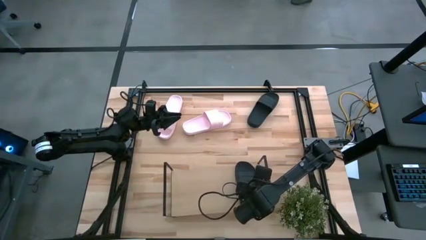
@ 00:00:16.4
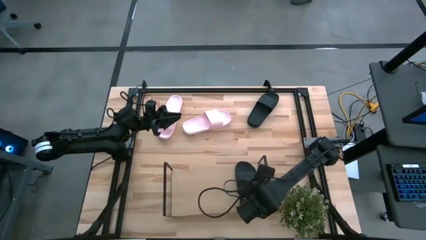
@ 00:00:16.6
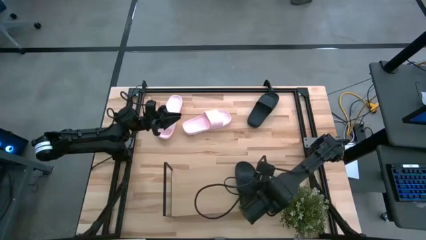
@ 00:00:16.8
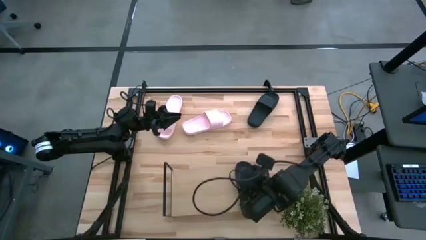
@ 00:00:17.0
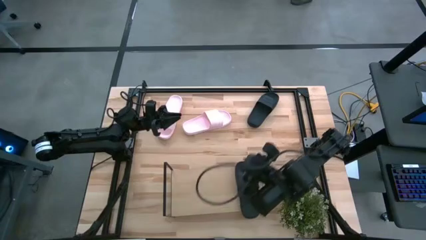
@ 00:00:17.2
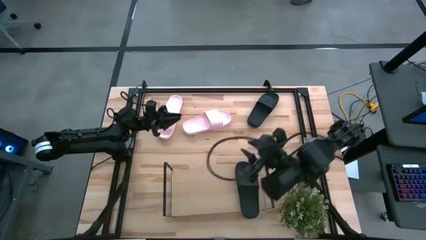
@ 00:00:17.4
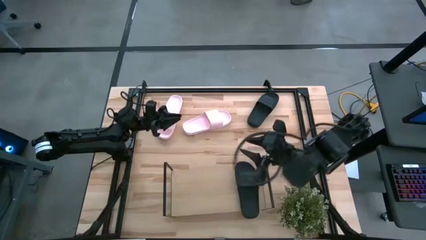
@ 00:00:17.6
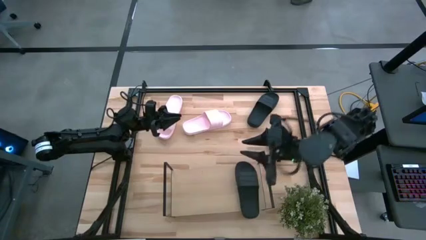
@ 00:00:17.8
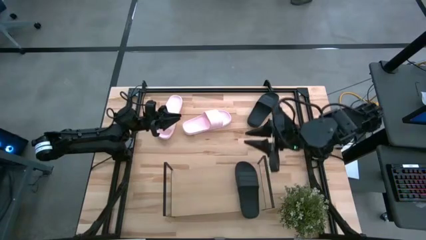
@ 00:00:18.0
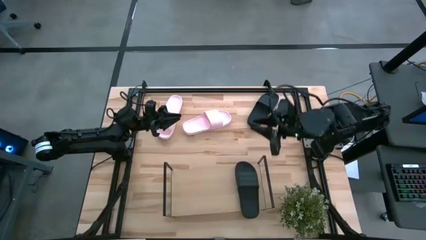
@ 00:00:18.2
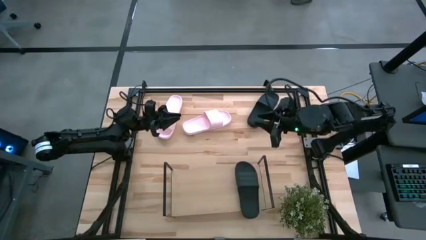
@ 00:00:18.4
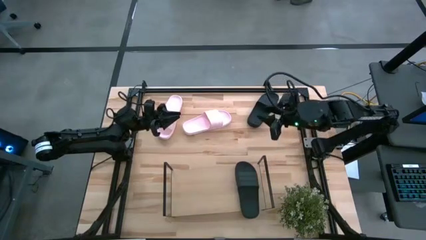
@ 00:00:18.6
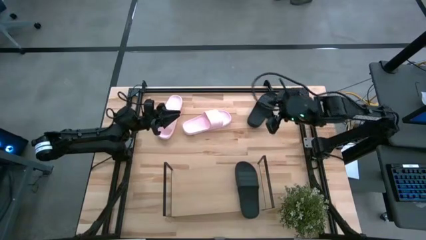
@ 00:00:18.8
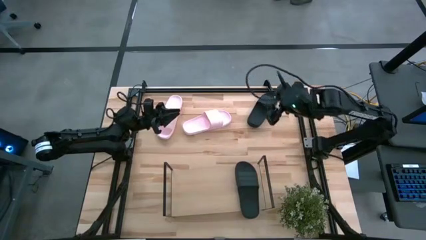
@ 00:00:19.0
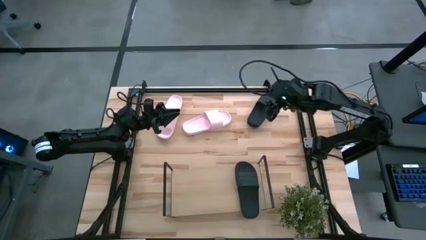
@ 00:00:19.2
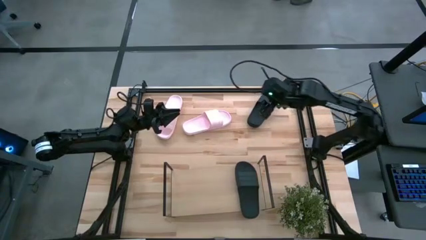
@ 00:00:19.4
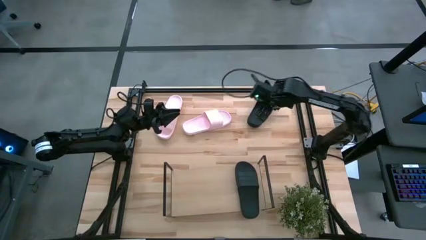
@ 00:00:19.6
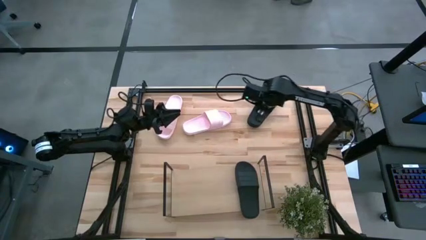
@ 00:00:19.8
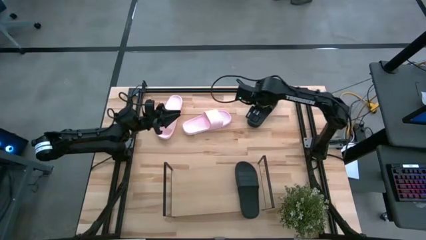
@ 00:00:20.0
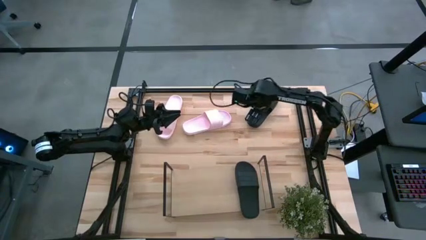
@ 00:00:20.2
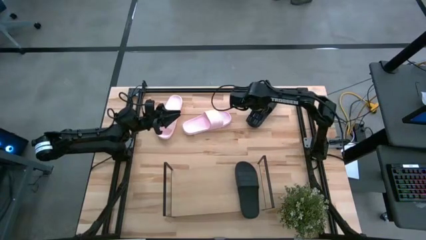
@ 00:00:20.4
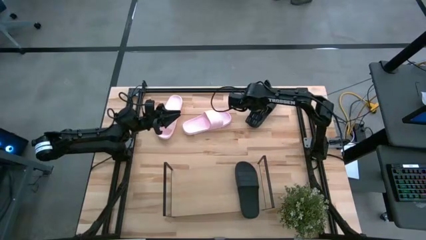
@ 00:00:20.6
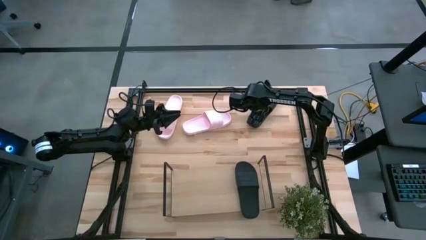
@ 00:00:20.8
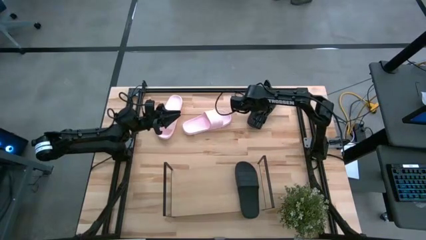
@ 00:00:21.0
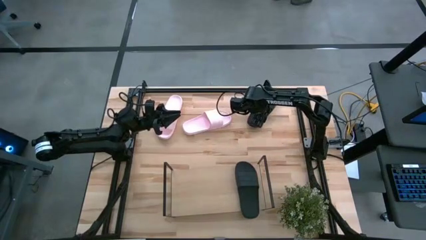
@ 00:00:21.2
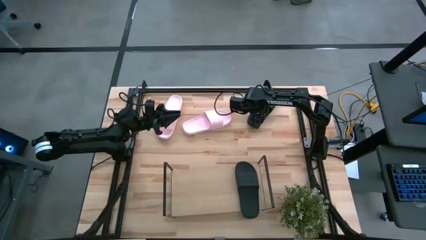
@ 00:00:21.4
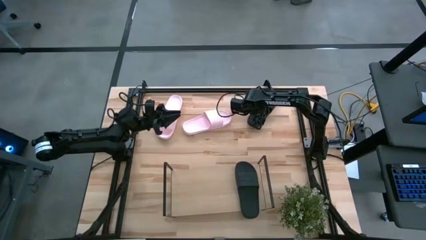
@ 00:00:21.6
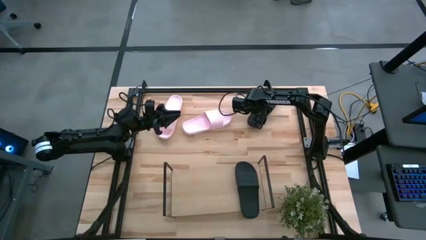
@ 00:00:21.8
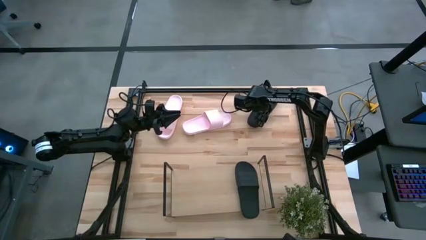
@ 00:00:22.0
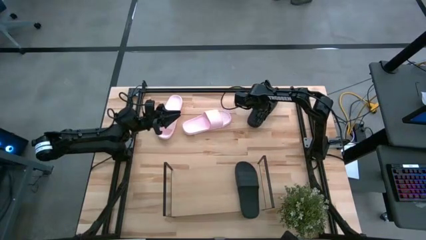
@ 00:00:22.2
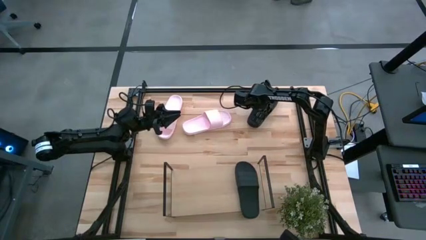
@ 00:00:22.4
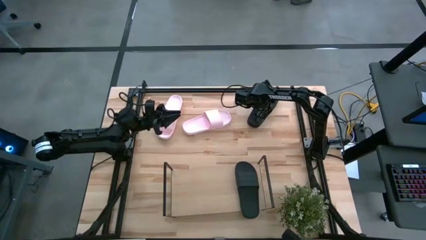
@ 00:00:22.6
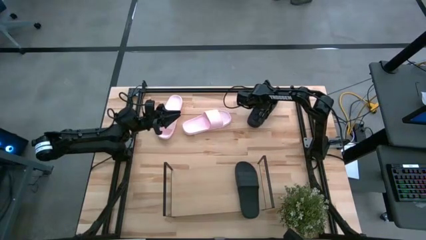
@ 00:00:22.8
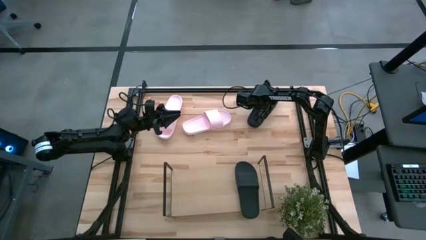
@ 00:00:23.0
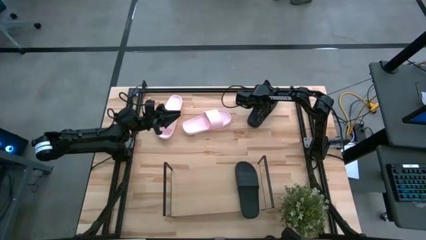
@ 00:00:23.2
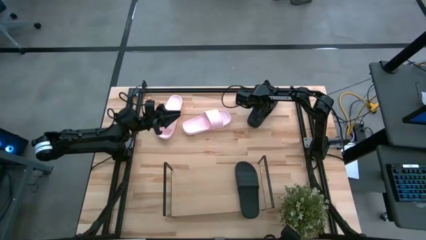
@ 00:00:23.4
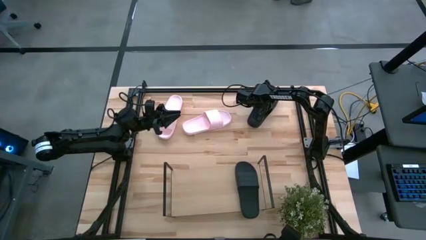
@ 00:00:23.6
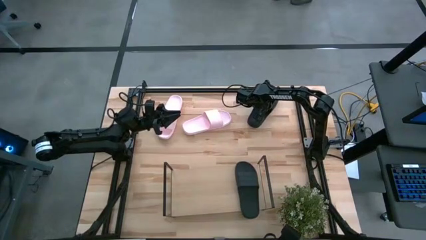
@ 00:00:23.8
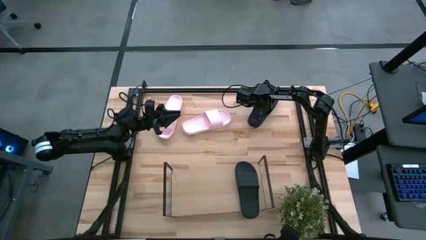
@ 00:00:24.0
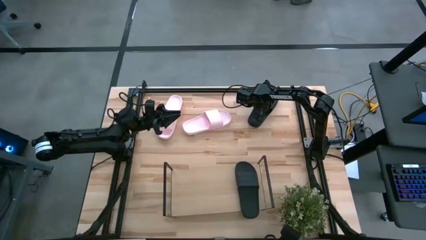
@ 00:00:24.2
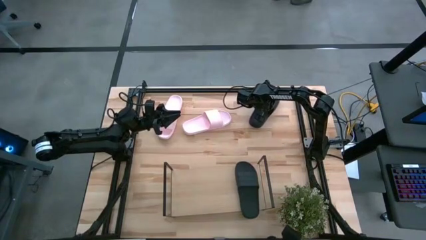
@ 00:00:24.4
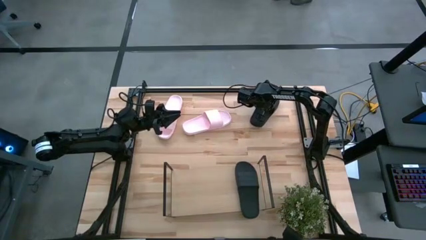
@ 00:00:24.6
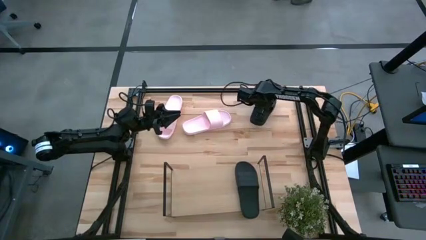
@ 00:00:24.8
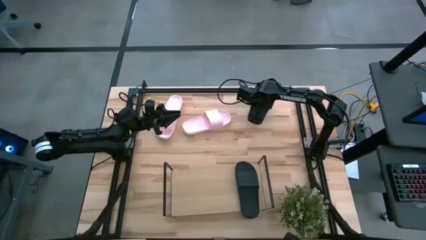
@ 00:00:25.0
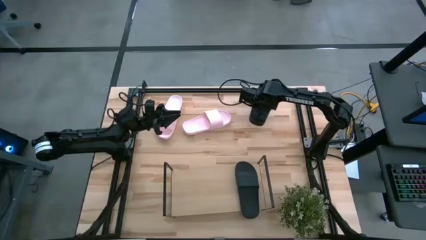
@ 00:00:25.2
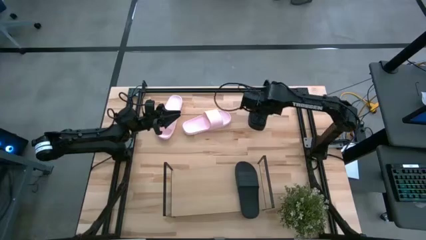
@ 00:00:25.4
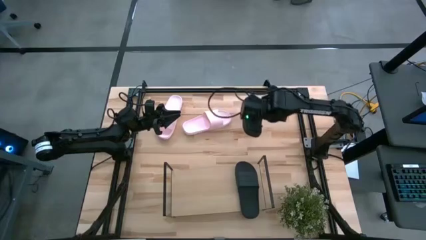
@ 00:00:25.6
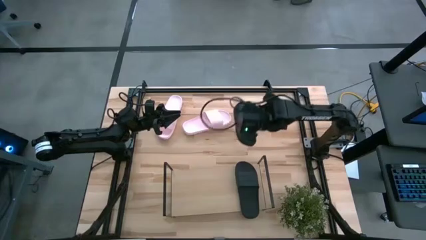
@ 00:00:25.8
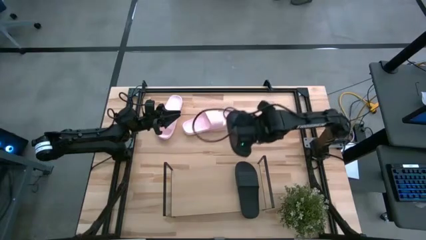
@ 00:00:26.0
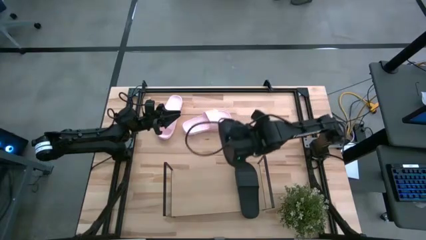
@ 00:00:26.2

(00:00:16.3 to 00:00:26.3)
Task: Pick and place slides into the shelf
Put the black slide on the shelf
